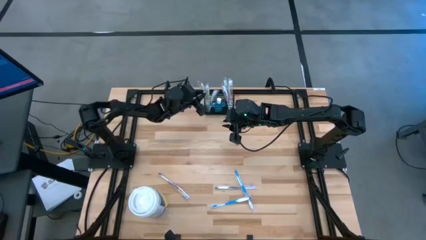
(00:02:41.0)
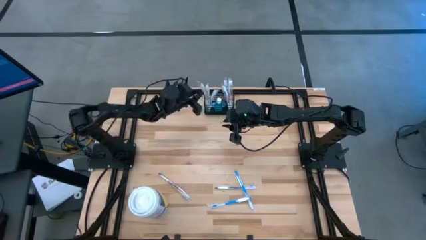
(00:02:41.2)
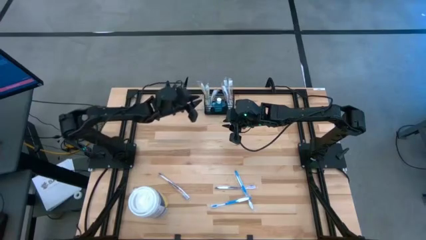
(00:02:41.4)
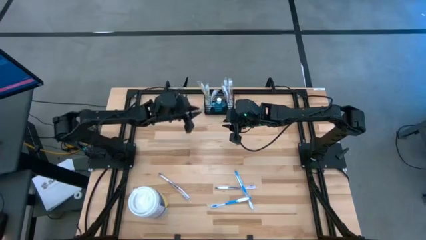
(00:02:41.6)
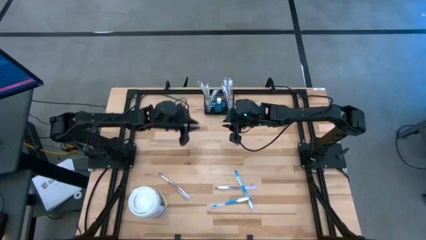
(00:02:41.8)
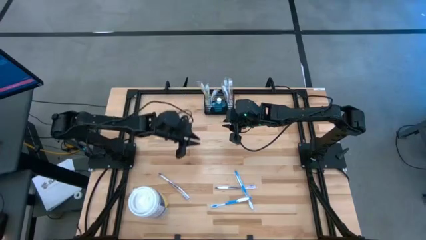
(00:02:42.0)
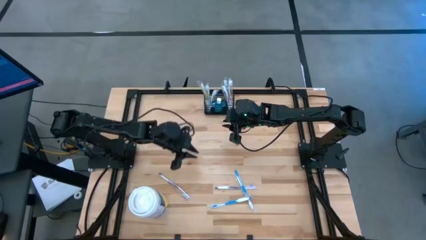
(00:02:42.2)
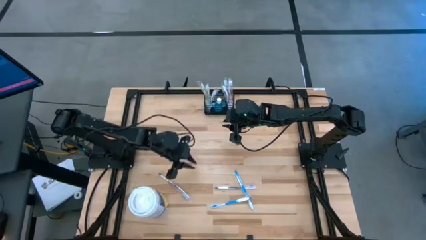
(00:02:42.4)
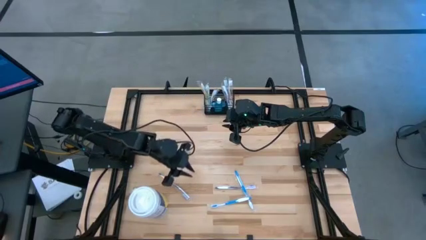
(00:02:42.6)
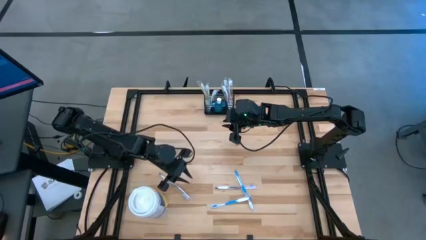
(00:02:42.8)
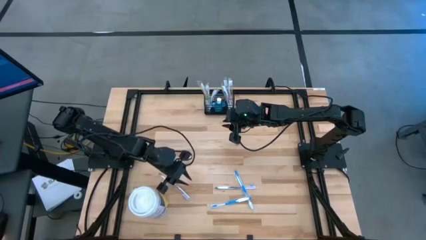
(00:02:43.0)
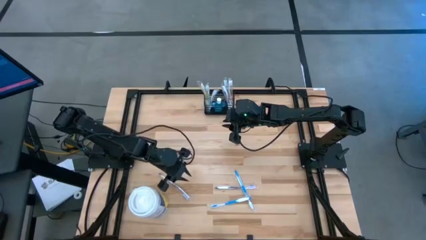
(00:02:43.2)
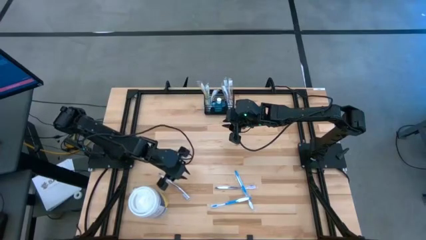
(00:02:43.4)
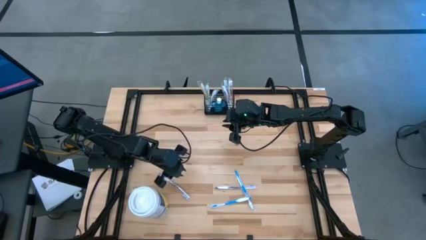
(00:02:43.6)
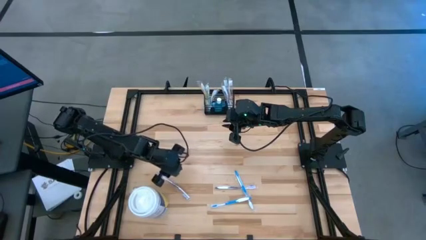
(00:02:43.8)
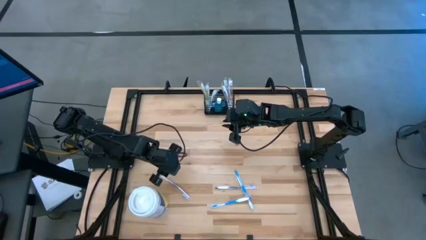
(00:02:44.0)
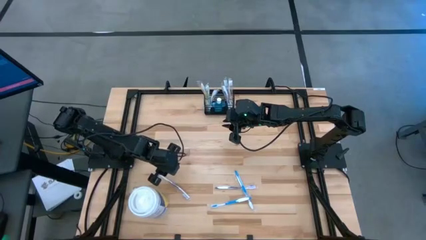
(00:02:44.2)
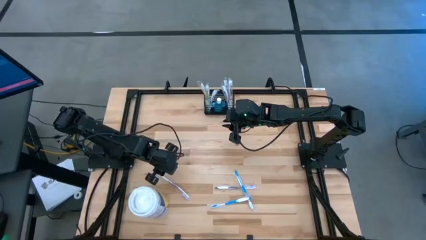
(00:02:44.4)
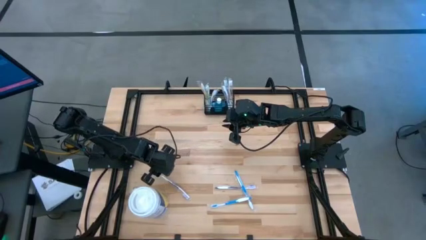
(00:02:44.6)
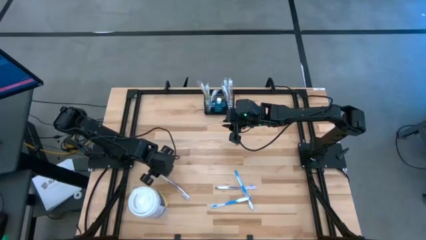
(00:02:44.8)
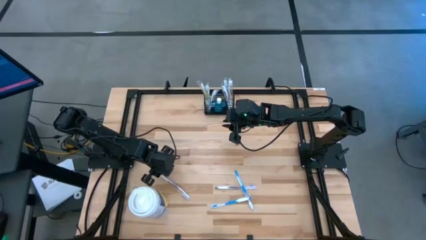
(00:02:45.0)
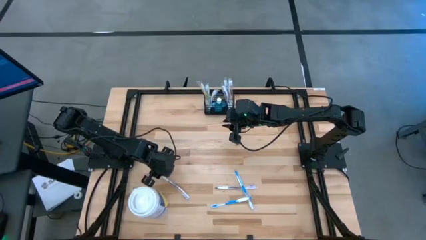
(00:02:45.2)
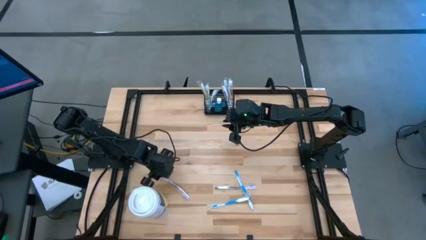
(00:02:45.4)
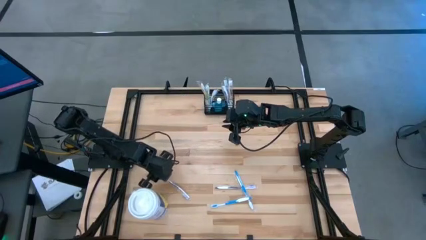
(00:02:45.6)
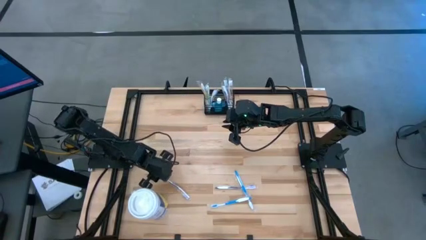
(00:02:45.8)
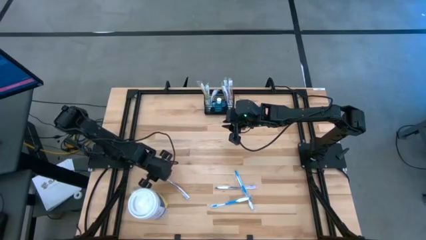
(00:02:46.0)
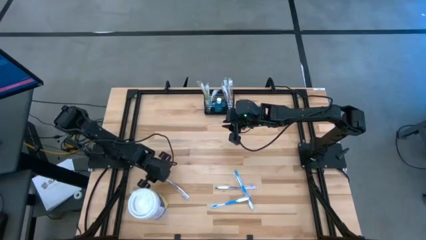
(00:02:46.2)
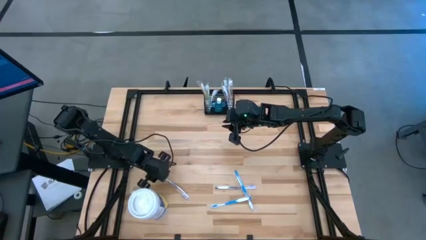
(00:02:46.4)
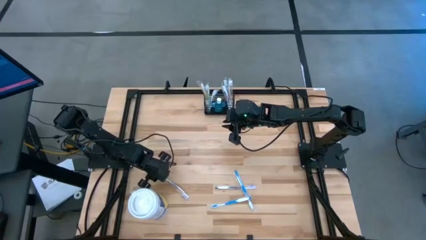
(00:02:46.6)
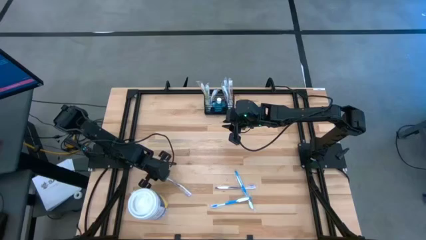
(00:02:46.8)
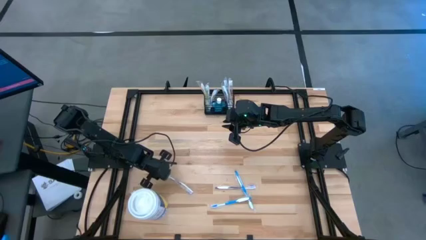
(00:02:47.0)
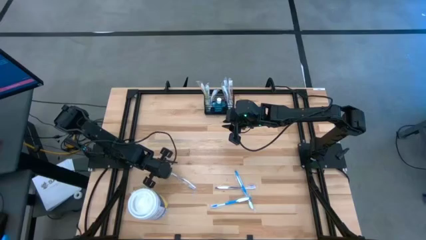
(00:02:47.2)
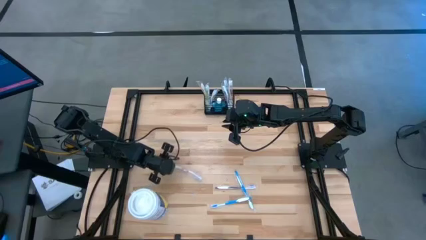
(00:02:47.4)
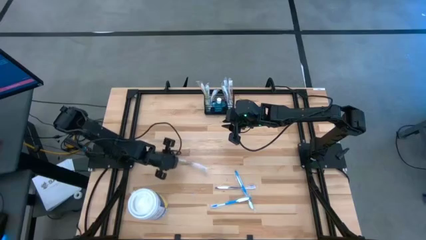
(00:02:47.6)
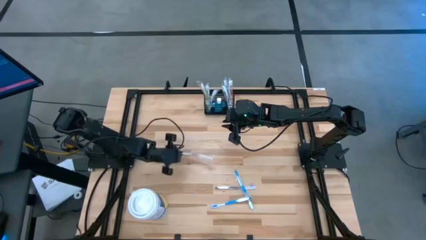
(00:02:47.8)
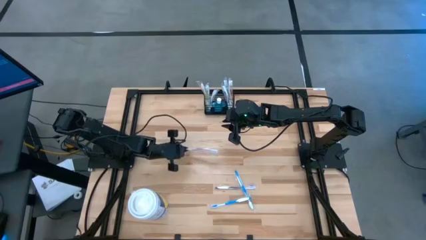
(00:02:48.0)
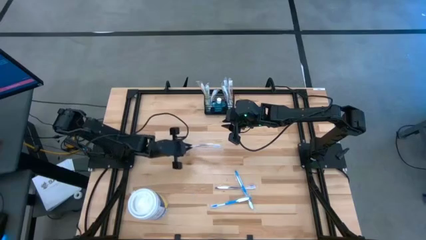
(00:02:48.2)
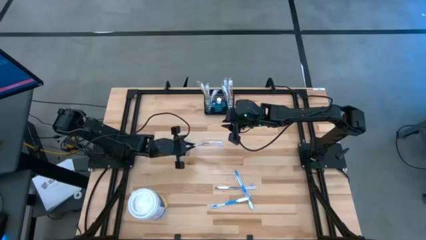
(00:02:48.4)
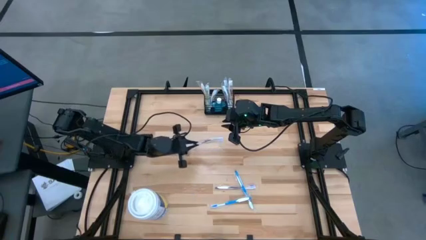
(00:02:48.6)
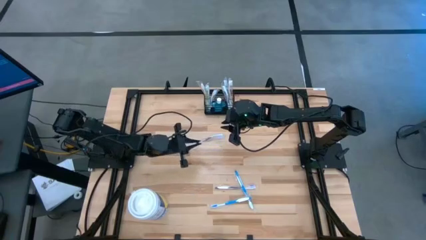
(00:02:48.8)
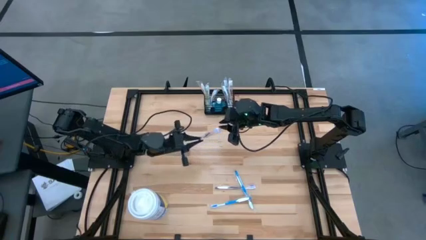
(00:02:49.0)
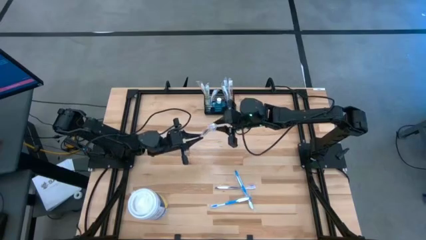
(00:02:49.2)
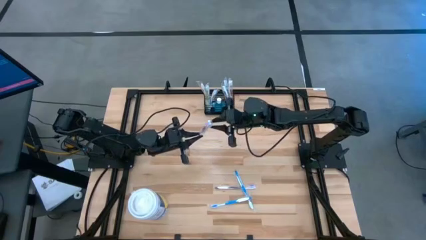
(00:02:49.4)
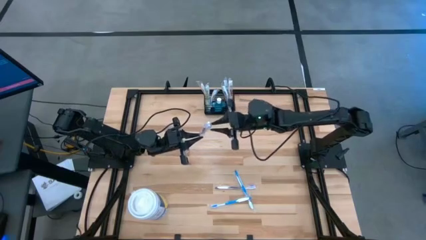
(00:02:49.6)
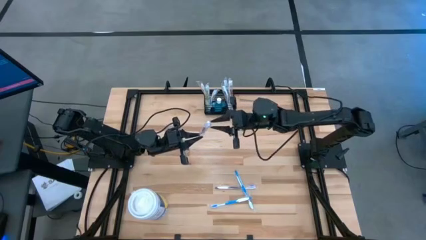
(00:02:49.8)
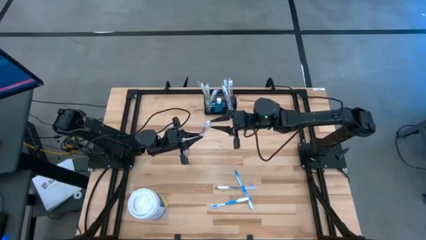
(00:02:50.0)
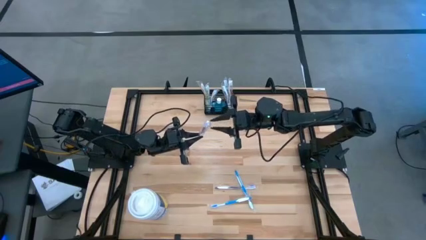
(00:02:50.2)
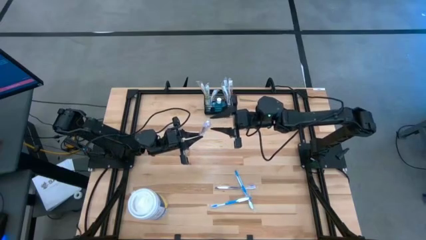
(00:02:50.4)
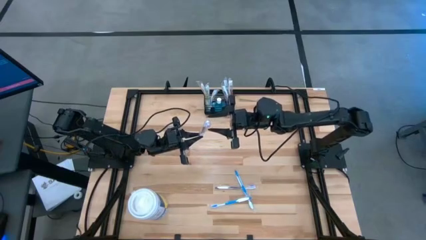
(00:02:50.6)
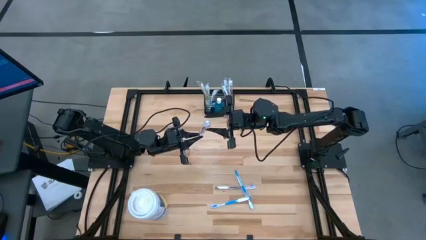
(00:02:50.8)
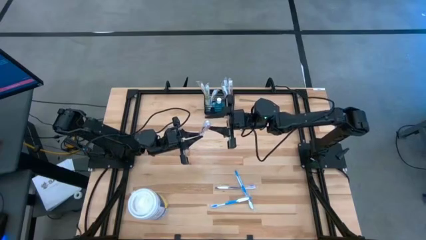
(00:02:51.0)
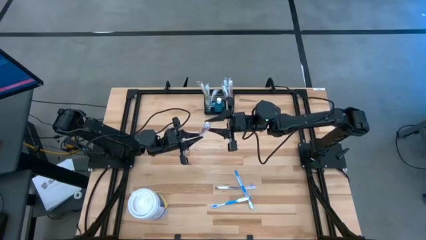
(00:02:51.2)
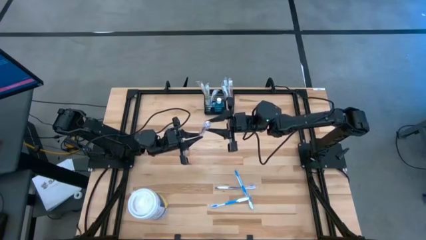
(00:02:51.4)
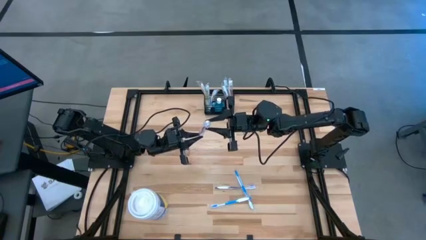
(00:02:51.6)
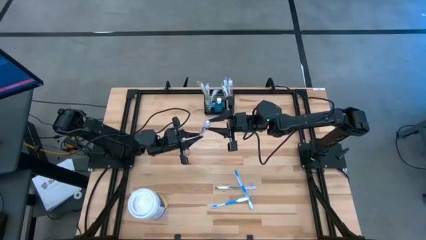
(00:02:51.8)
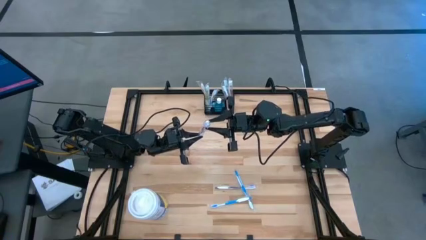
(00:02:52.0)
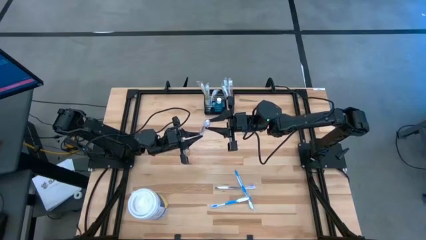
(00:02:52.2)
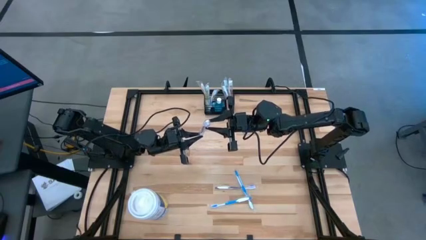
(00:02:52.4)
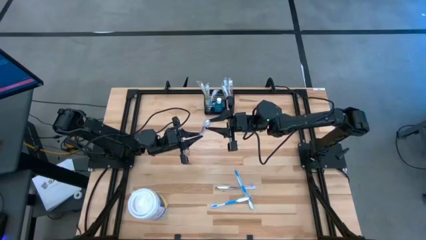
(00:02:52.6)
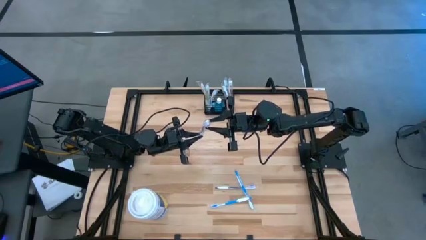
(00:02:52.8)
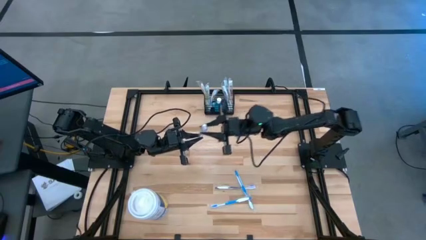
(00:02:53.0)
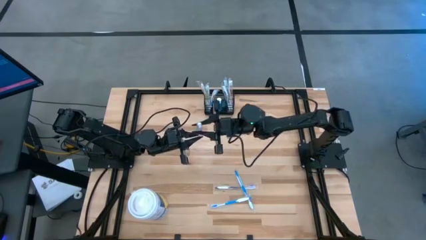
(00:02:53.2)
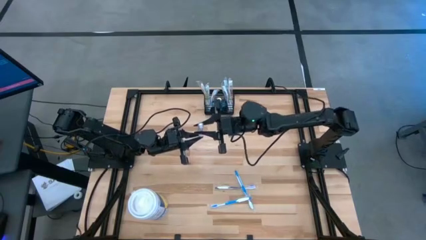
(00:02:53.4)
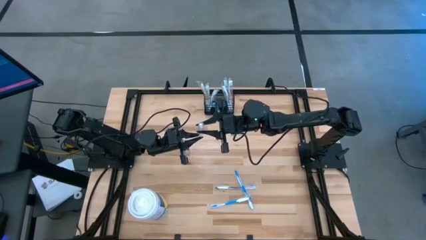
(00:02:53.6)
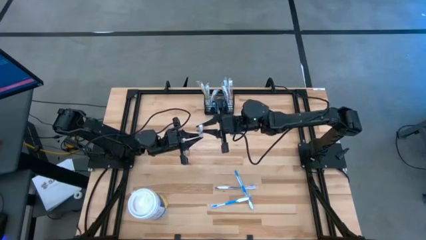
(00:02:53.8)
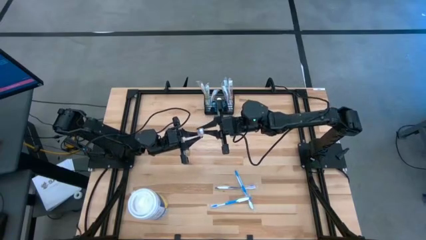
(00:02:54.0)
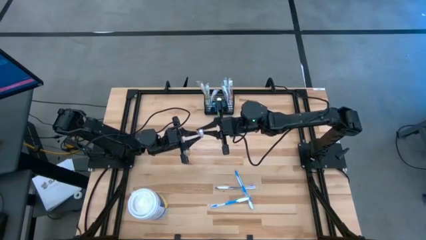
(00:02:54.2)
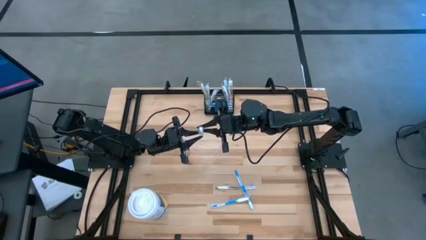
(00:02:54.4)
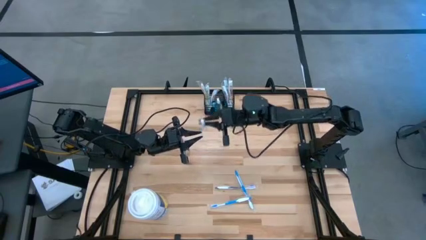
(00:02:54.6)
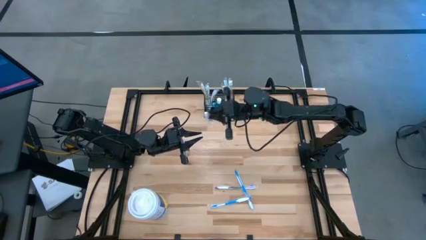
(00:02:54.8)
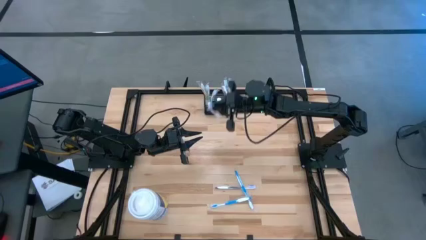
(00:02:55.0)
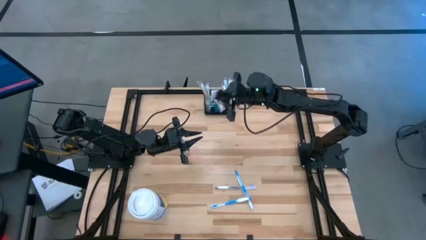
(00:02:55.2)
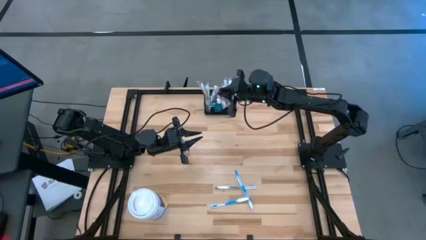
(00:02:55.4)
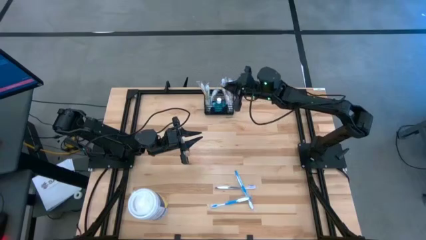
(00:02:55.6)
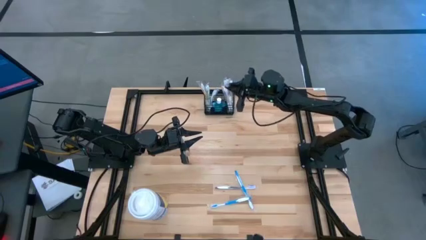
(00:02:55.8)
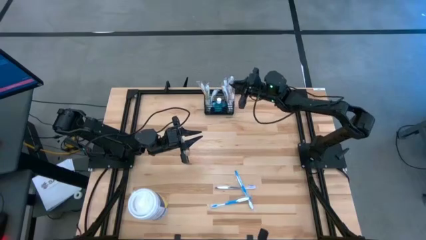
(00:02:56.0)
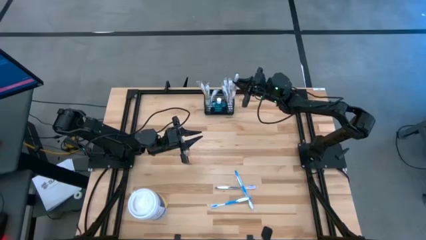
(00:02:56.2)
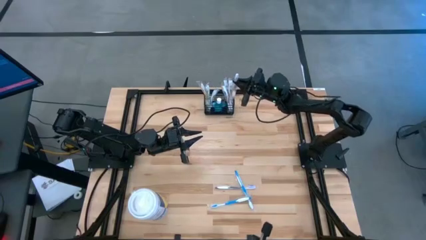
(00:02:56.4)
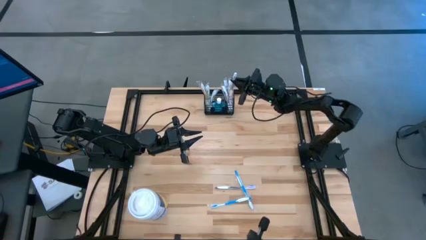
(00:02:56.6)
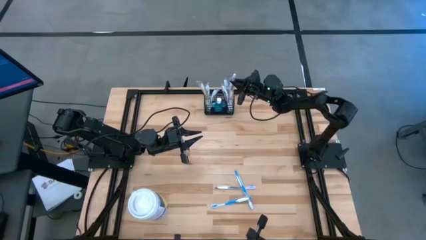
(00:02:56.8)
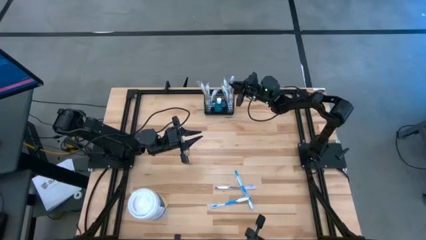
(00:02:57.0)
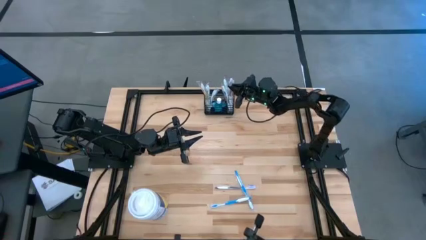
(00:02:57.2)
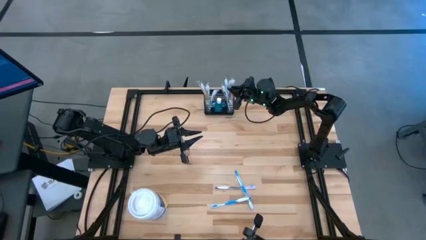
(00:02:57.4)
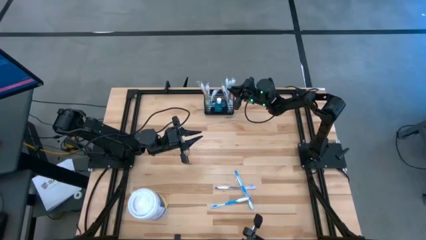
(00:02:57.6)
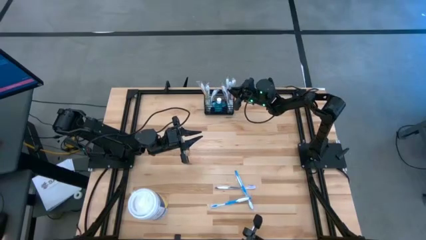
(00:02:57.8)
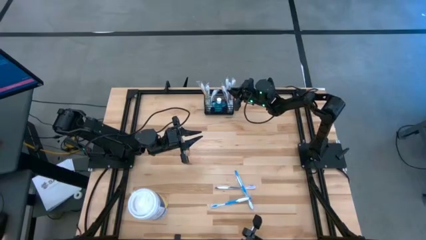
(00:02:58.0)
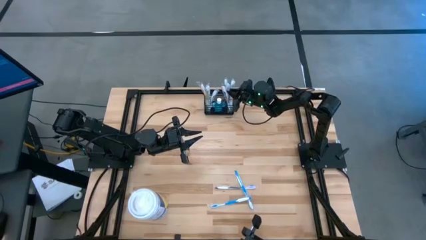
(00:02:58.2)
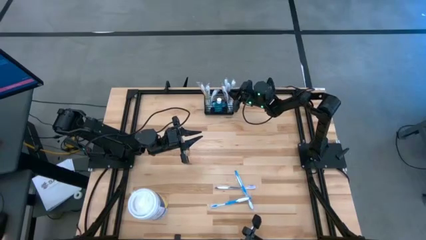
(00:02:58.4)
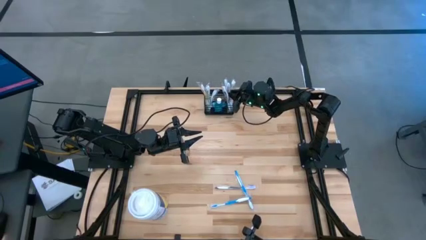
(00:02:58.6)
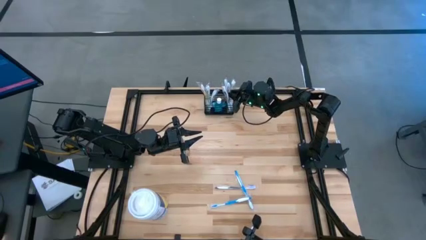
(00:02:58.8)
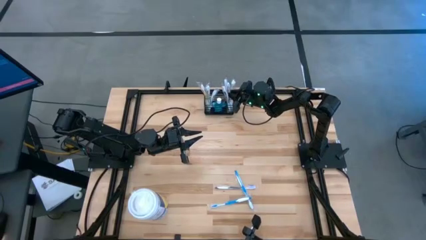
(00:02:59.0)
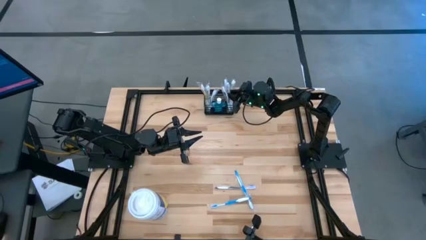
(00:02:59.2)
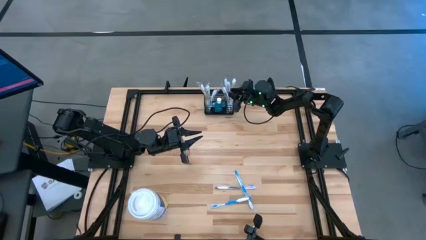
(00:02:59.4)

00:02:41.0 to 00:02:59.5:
Task: Pick & Place toothbrushing station
Put the purple toothbrush into the mesh organizer
